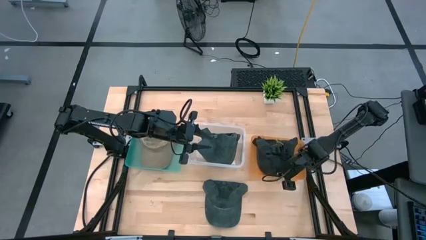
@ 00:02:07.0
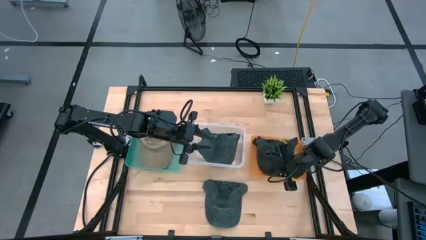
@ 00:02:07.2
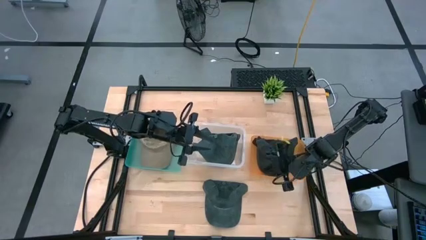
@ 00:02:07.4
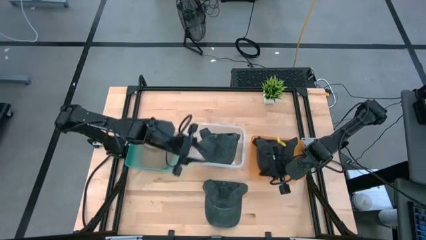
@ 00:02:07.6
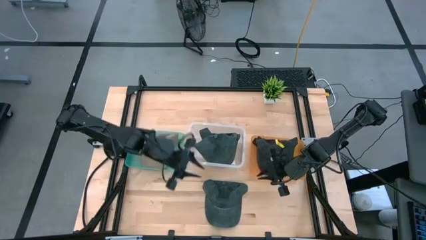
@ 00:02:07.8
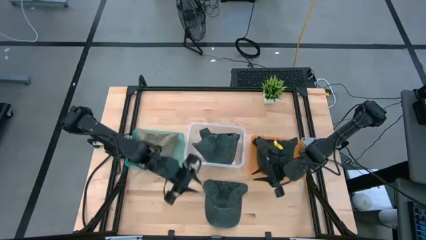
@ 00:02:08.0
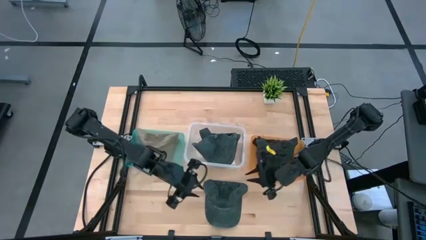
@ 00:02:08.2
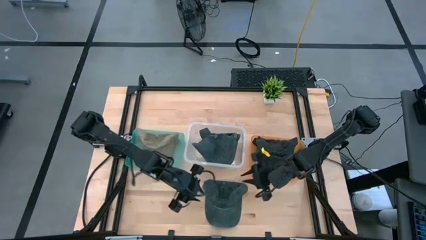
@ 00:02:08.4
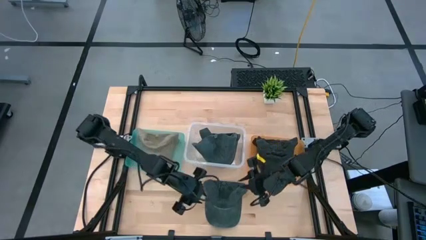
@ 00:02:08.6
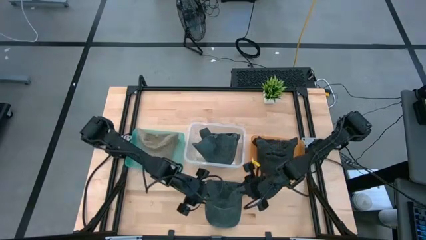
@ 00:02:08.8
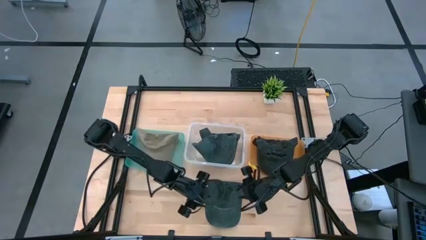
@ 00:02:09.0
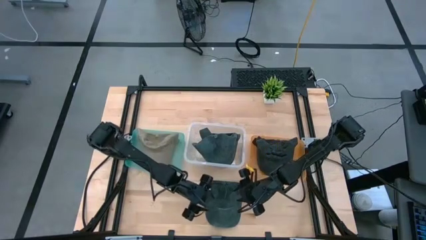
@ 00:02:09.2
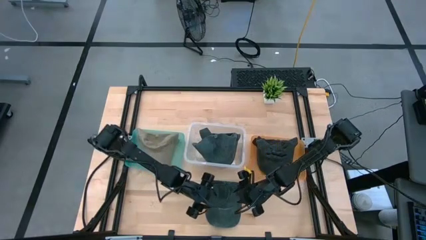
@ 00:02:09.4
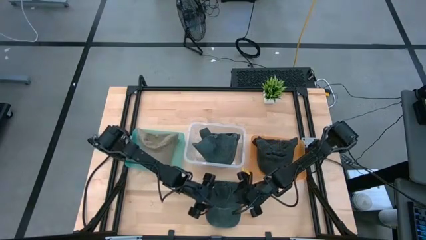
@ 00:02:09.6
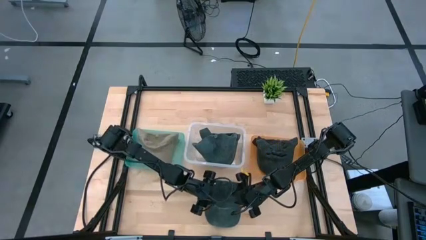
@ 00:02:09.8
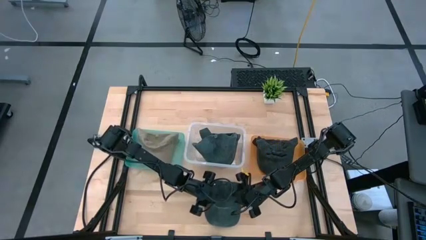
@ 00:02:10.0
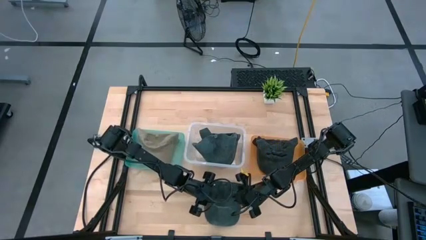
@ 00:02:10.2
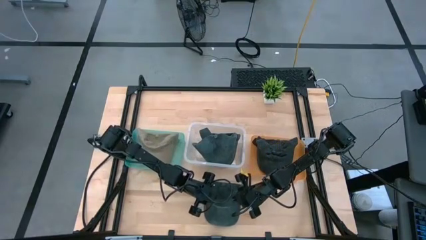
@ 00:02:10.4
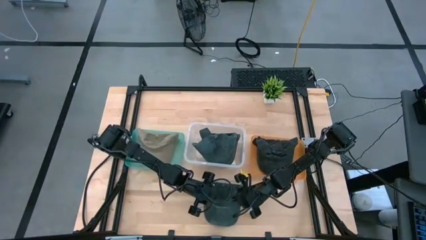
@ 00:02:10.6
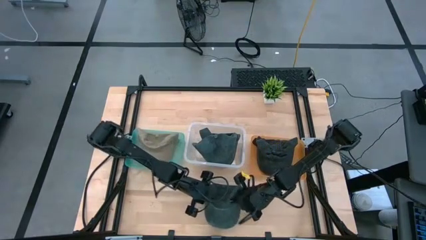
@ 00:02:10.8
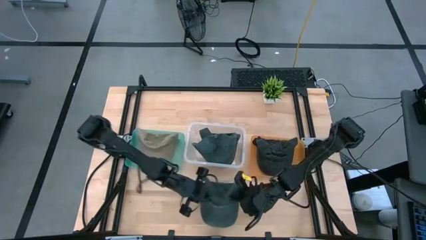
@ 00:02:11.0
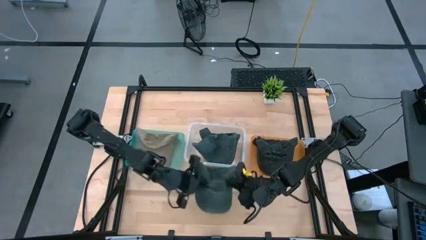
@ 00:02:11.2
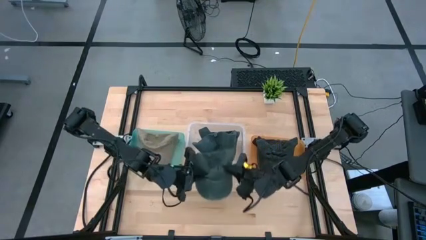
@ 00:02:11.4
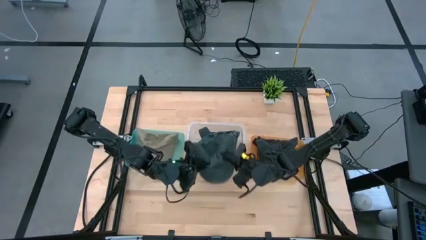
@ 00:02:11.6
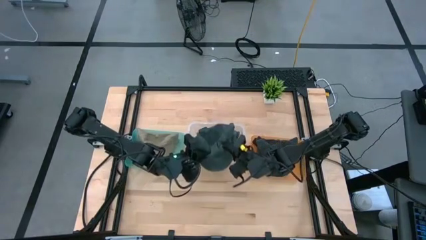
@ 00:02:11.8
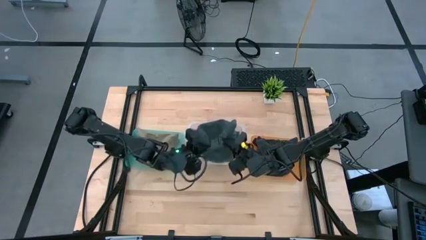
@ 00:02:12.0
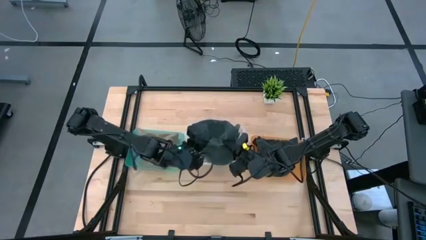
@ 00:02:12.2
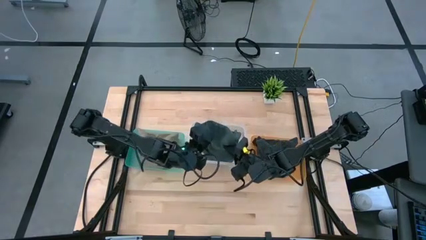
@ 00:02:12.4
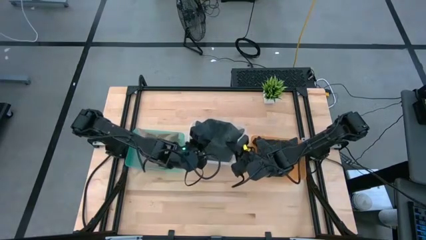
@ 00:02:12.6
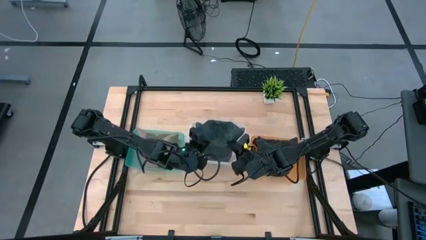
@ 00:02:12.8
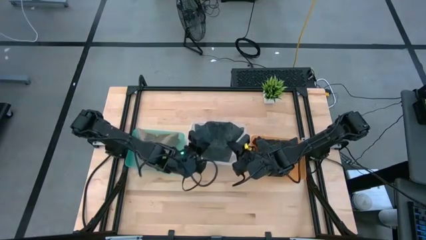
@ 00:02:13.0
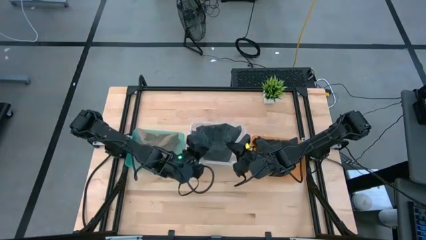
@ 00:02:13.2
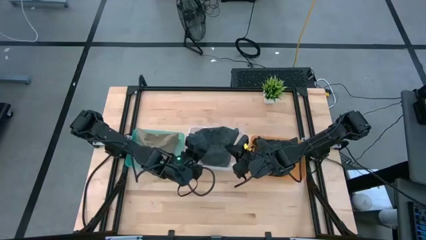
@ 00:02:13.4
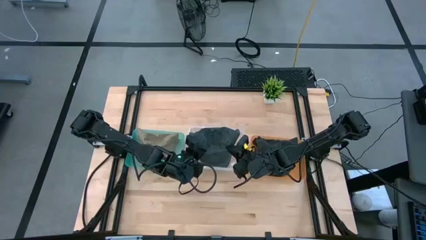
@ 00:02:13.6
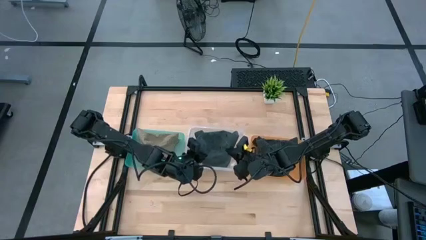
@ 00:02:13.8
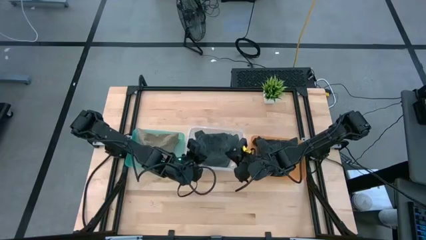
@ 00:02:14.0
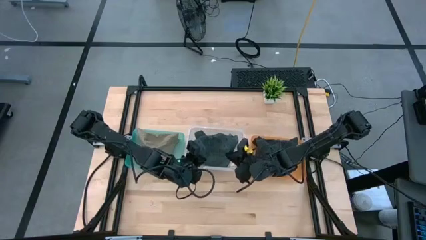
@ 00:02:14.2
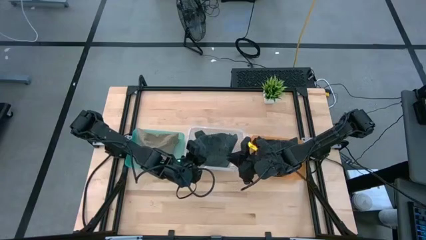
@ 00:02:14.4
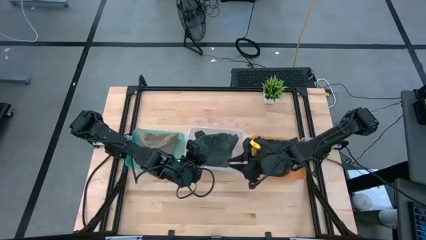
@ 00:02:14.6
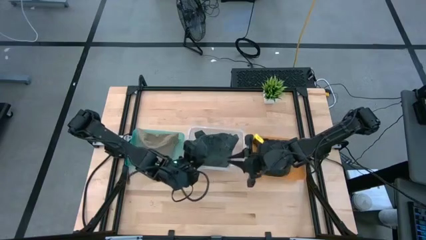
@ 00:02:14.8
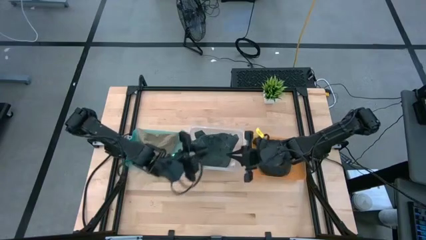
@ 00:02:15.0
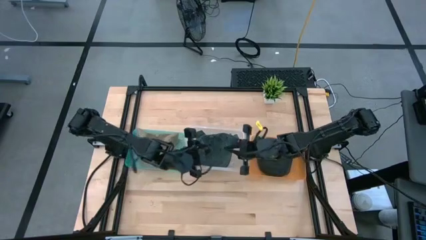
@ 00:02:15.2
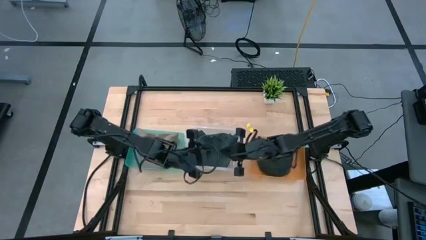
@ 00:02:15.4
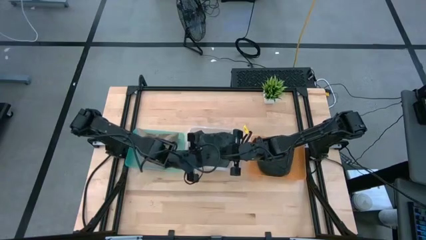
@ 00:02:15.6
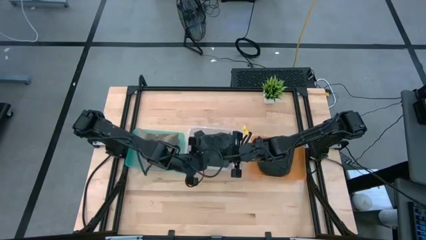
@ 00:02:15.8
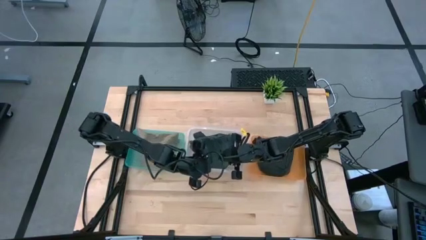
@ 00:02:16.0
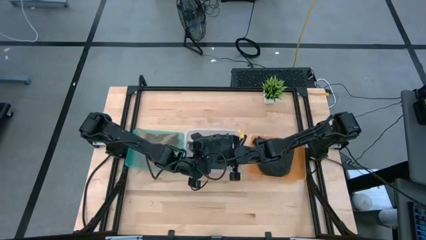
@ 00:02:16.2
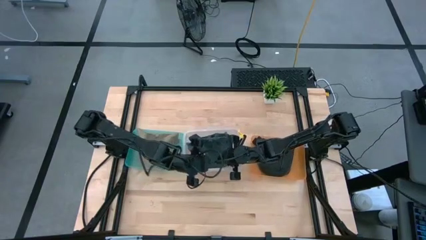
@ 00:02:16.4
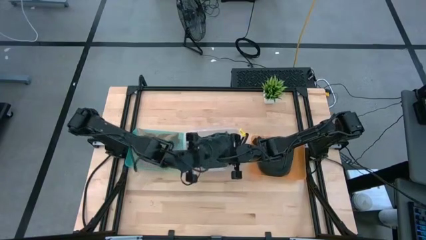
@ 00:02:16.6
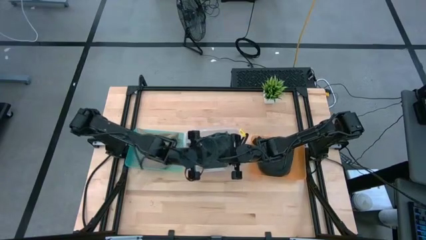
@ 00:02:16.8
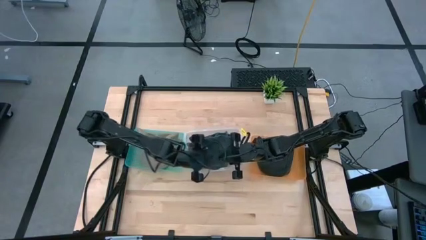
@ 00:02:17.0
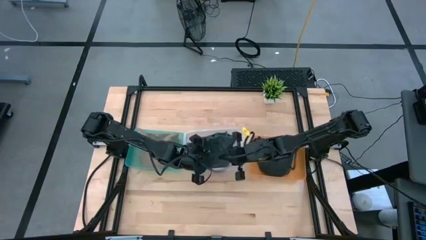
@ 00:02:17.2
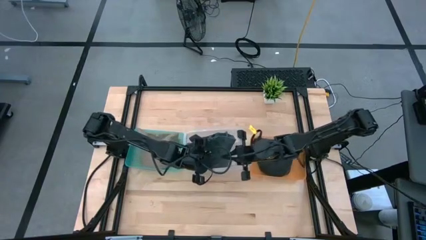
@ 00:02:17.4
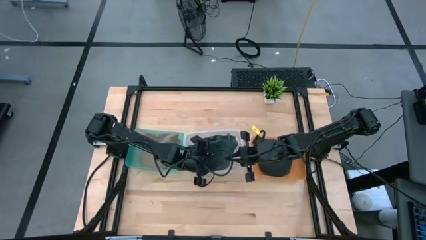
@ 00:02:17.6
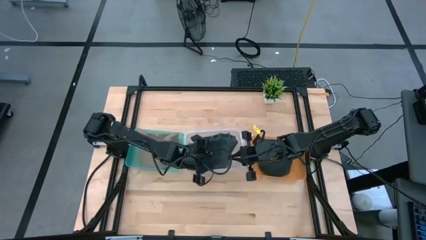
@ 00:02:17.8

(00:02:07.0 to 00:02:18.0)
Task: Pick & Place hat
Put the gray cap into the transparent bin

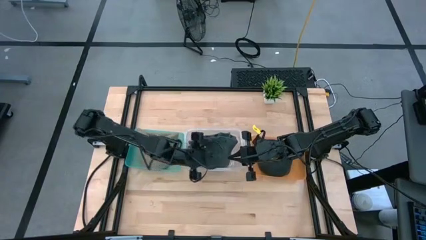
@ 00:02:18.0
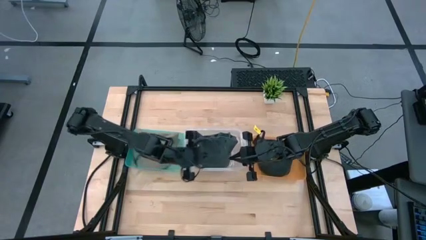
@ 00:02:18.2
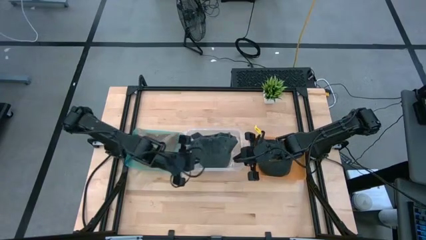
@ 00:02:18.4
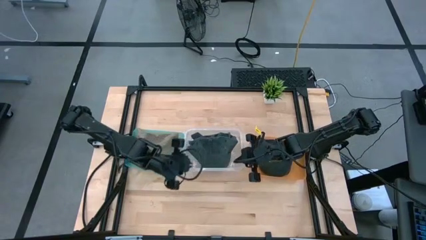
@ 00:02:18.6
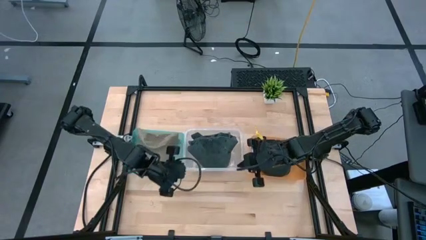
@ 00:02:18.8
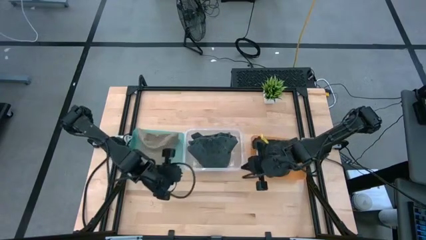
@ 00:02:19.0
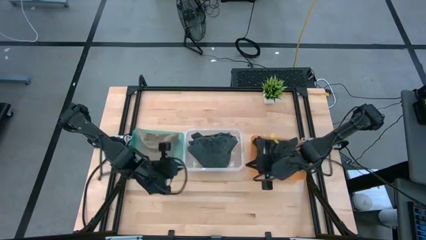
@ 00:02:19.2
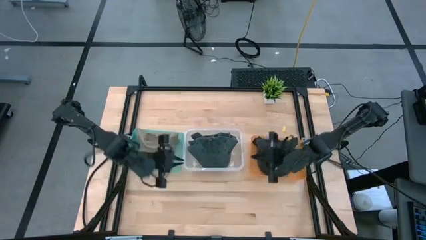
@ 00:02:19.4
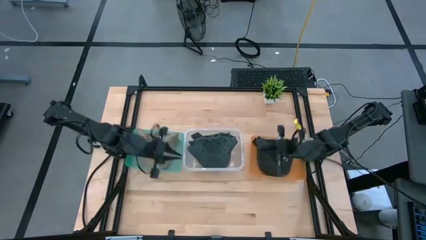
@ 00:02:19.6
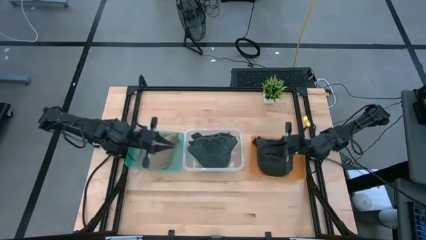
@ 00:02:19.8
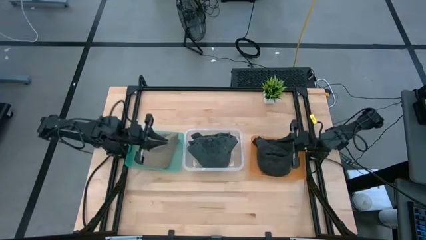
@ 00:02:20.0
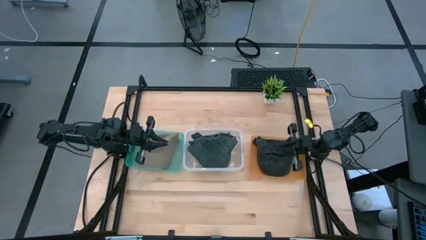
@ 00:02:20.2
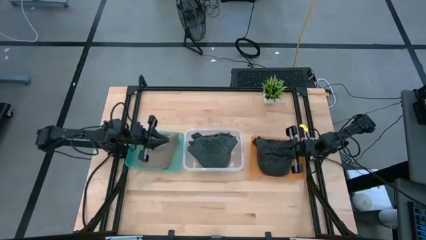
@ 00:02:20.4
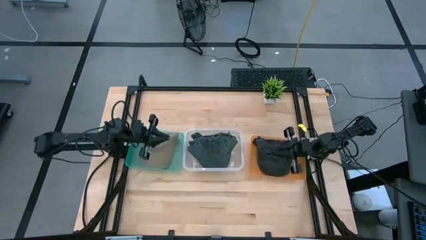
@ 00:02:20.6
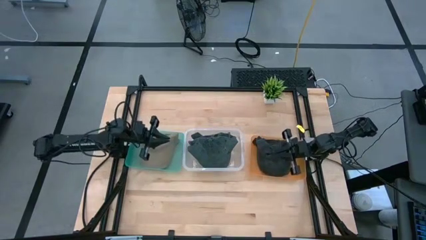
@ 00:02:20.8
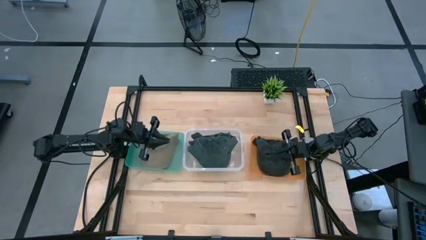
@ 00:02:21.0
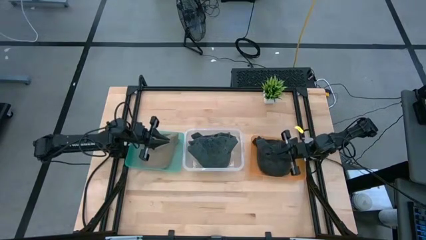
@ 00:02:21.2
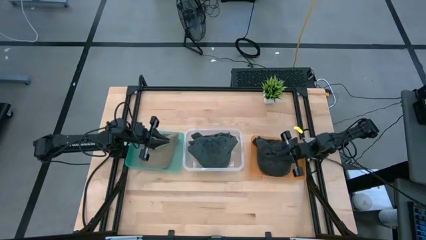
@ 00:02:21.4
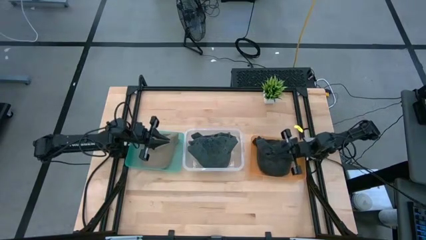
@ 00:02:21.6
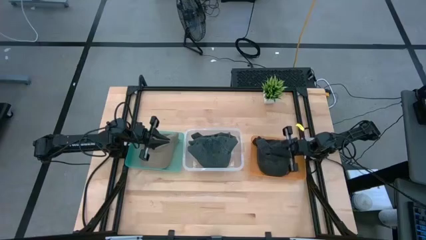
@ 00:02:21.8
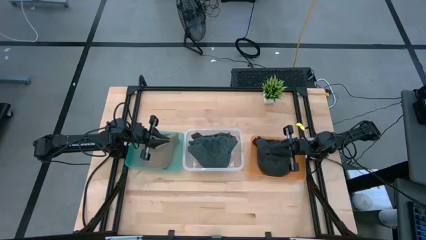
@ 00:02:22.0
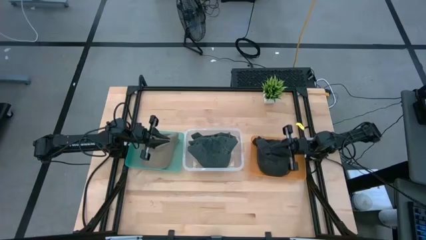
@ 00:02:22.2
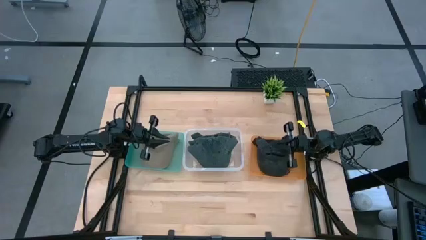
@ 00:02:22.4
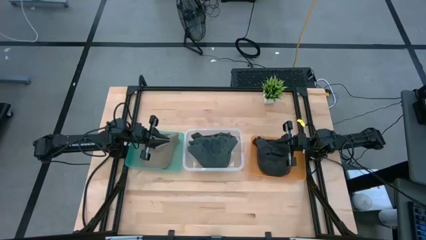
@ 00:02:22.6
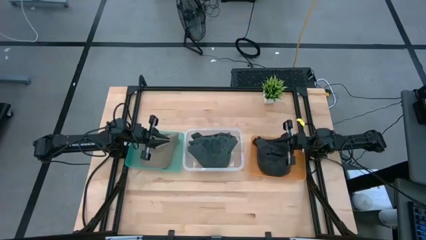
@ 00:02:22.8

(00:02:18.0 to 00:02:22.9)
Return to Home Position
